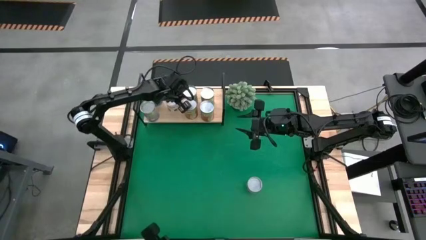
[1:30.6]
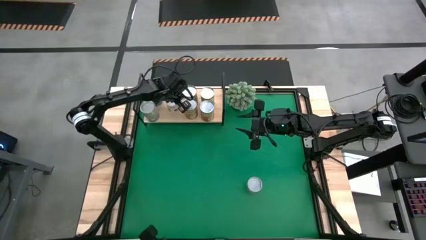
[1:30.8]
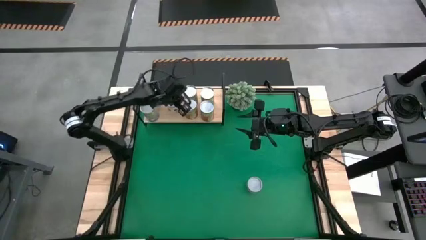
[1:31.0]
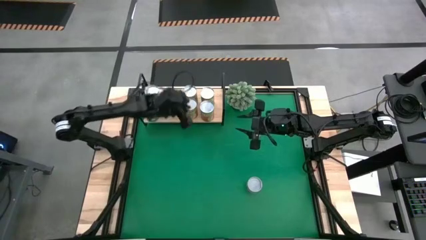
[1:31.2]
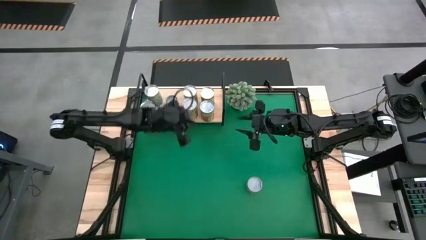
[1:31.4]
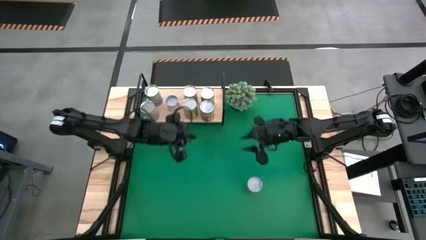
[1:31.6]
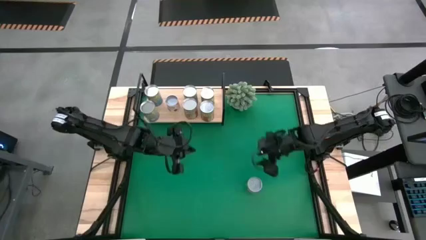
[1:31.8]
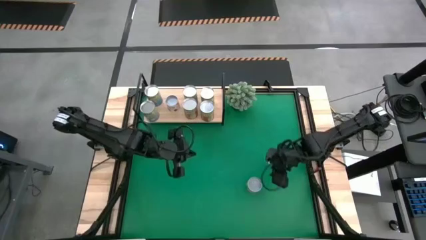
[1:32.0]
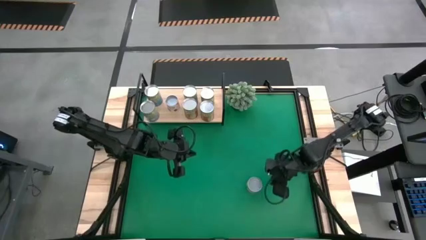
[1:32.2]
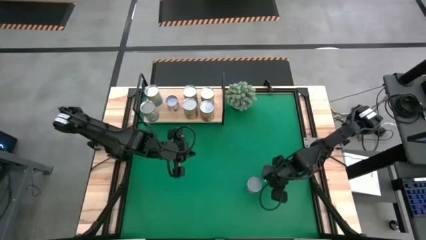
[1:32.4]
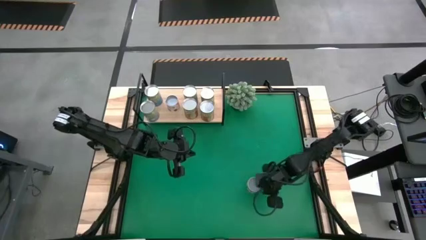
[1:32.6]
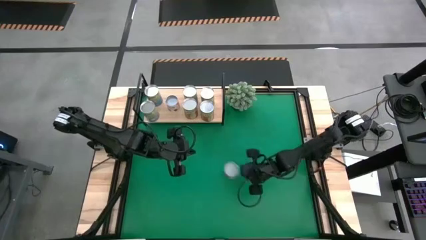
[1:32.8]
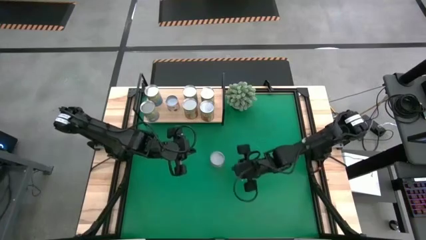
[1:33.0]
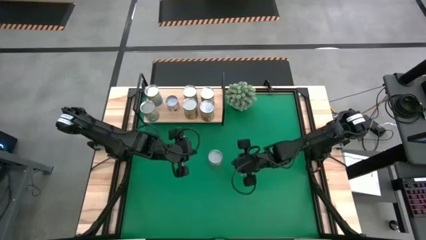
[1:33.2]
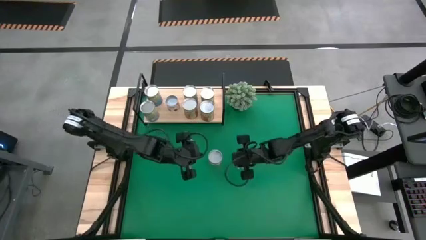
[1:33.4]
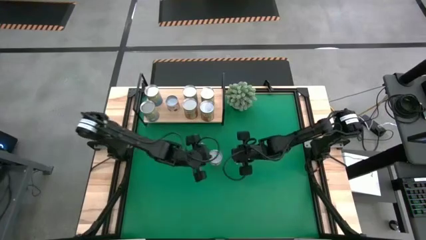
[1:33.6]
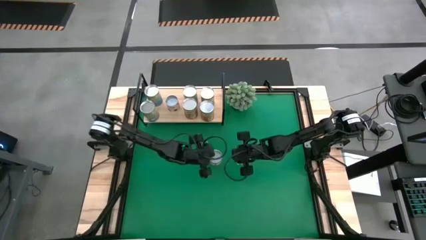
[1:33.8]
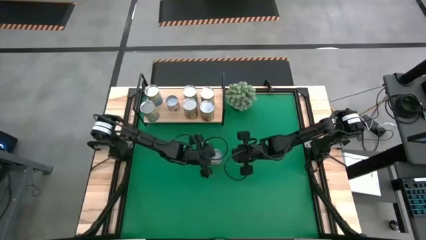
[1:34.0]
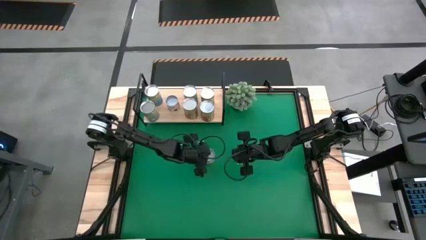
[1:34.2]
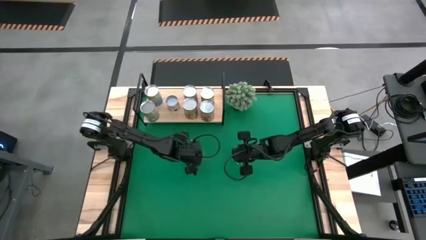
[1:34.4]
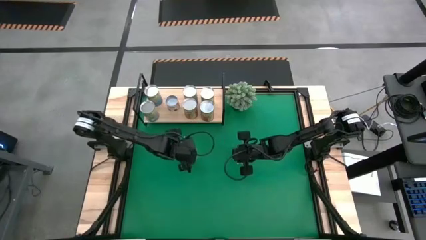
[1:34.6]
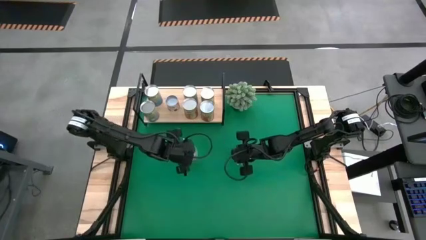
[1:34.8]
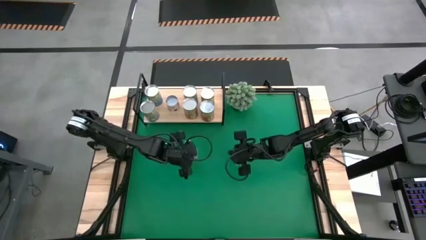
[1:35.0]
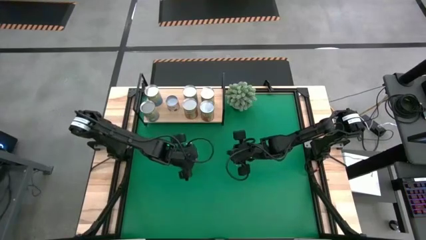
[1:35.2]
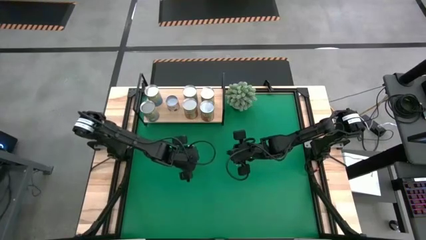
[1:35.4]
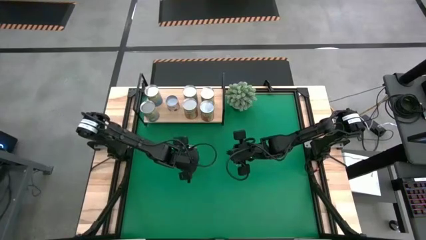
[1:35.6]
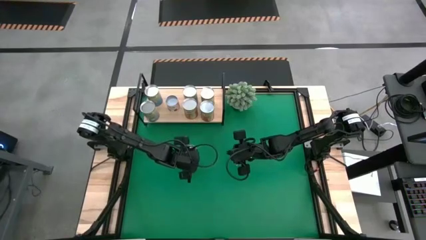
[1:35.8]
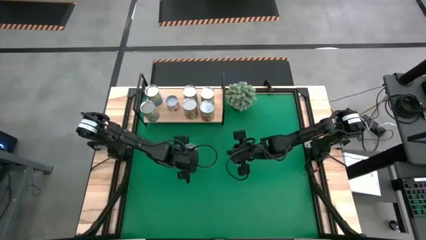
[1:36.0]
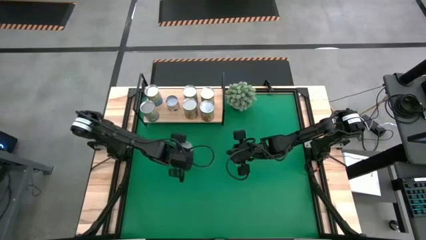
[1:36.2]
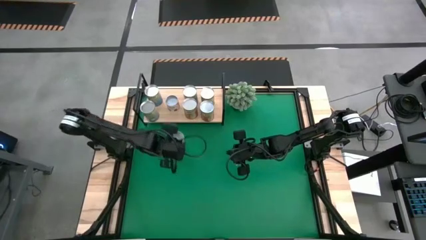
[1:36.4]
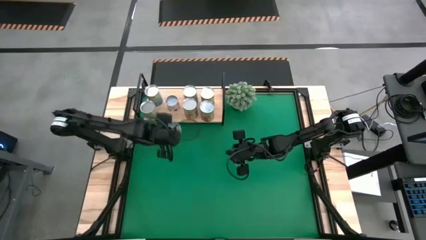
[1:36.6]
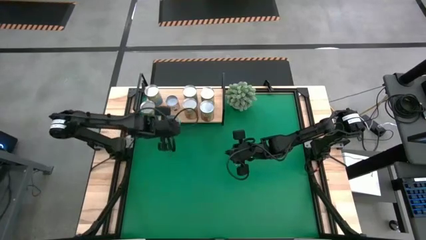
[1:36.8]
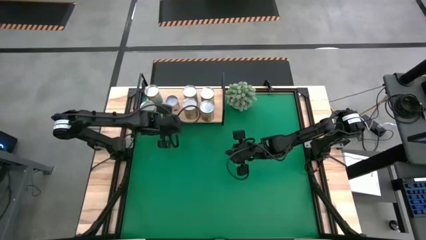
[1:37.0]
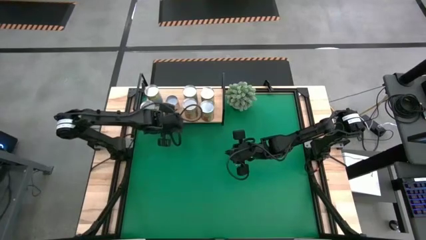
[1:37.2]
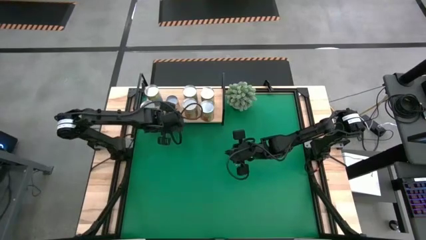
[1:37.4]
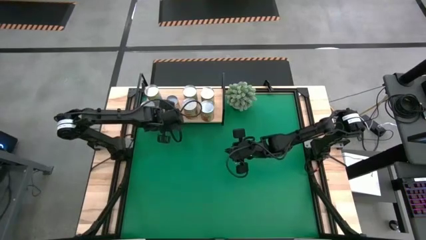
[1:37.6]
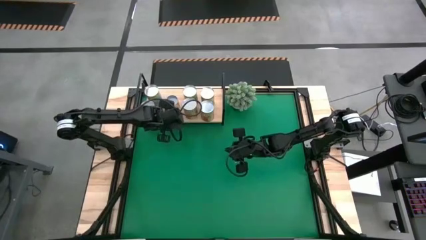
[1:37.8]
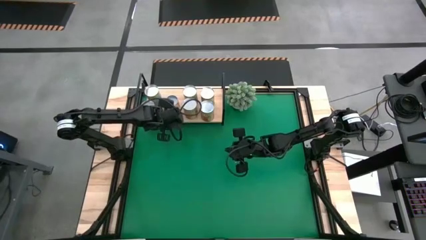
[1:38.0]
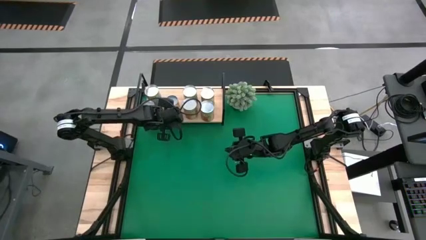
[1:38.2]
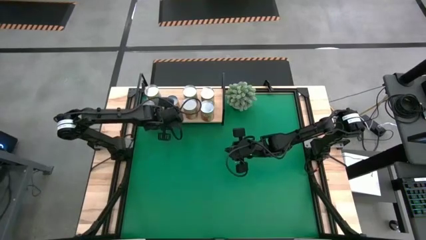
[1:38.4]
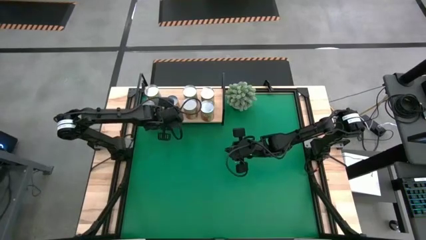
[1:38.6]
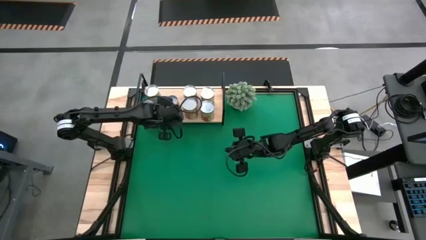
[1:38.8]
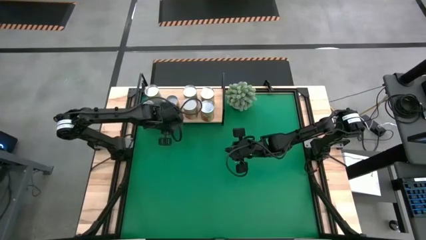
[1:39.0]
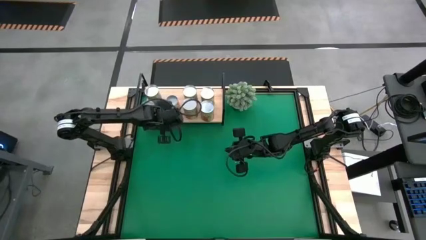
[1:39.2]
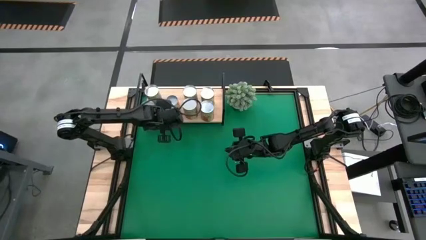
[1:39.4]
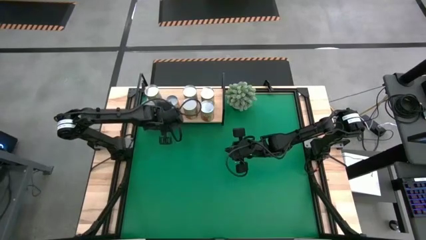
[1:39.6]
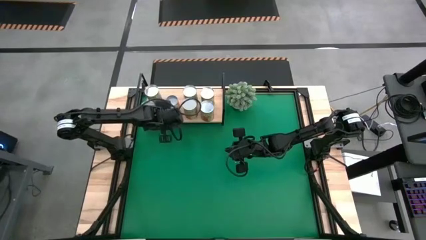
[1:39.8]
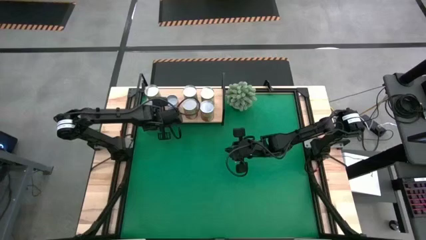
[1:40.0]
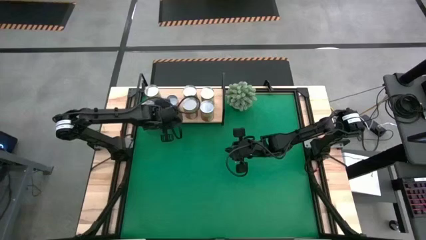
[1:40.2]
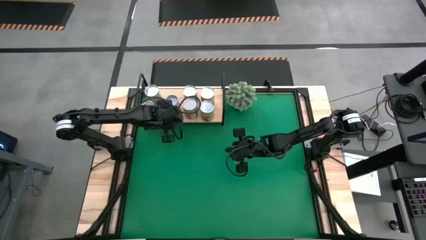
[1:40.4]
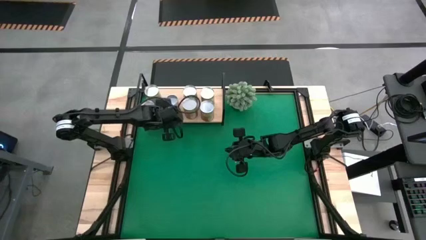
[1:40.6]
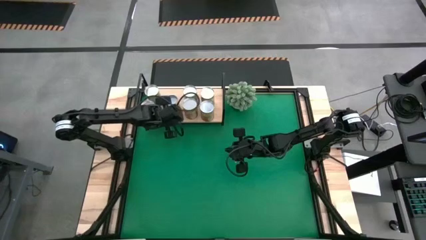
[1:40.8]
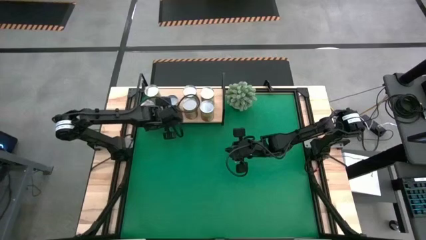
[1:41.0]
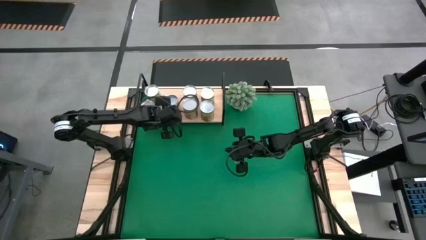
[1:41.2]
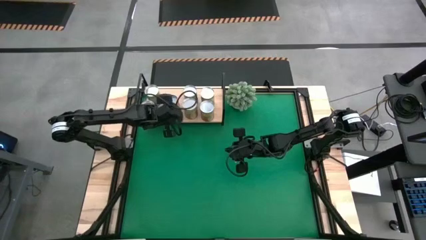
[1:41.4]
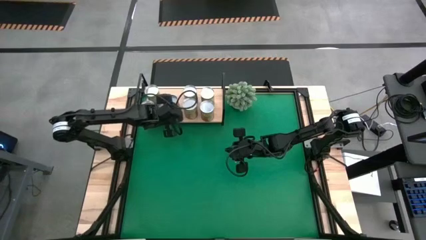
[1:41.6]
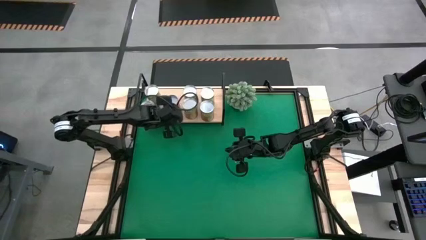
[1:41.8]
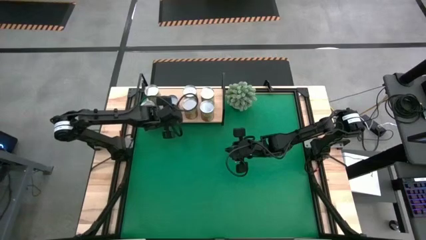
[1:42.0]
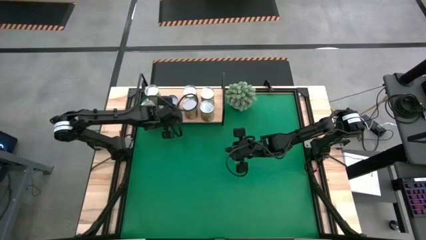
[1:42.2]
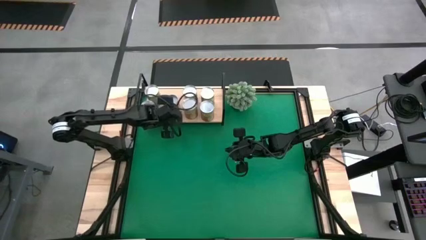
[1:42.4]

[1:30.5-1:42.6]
Task: Pick and place cans onto a shelf
Put the canned sliced peaches on the shelf

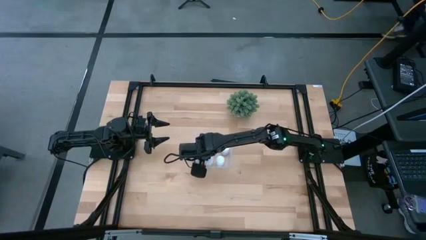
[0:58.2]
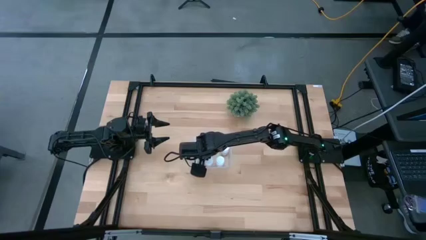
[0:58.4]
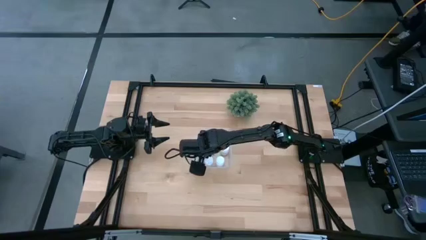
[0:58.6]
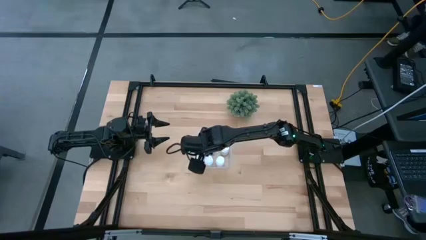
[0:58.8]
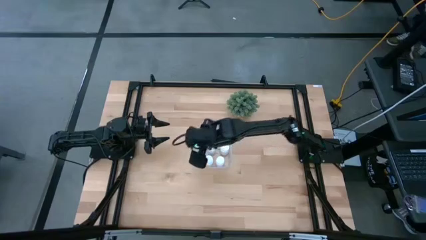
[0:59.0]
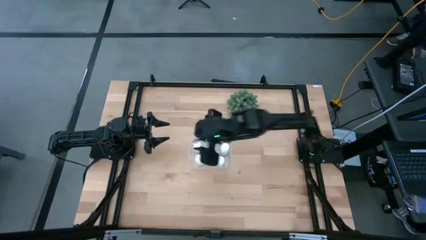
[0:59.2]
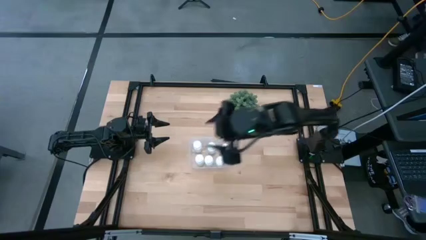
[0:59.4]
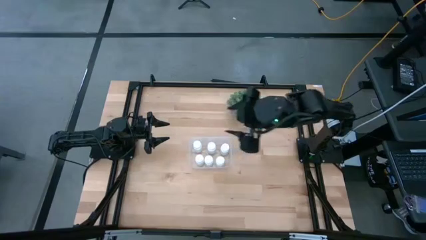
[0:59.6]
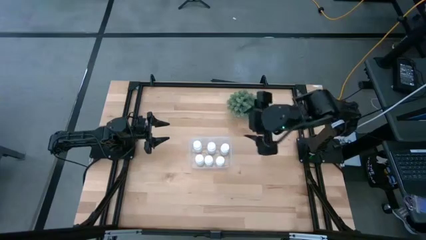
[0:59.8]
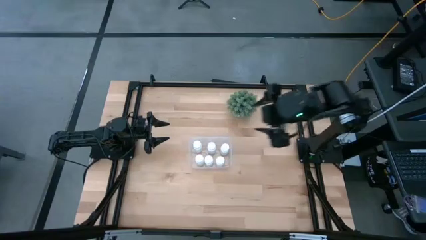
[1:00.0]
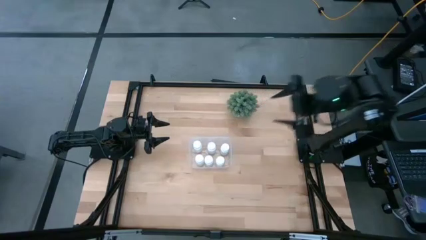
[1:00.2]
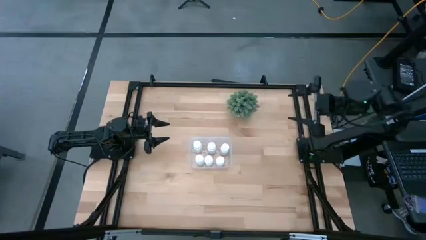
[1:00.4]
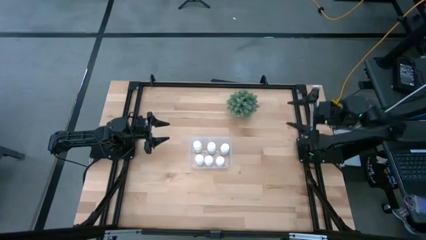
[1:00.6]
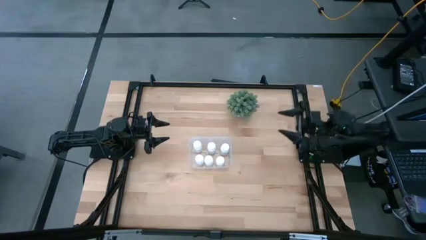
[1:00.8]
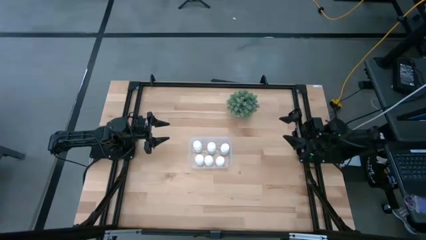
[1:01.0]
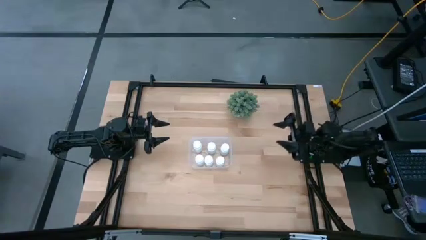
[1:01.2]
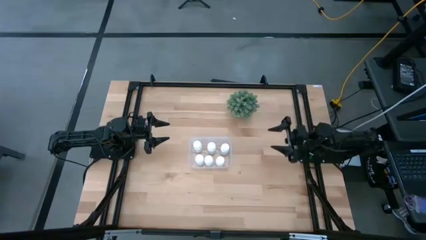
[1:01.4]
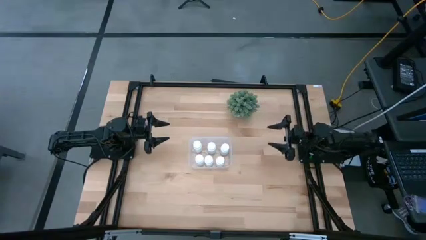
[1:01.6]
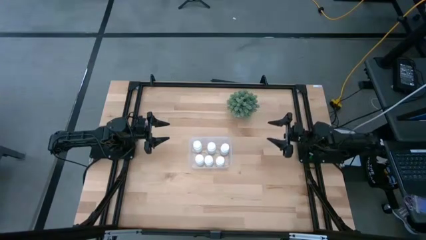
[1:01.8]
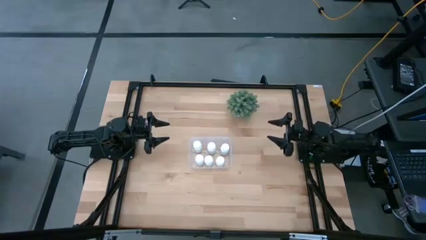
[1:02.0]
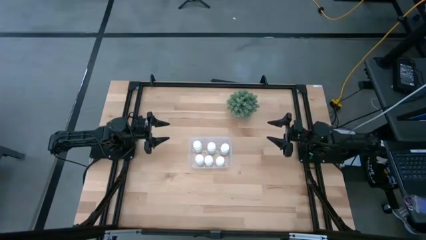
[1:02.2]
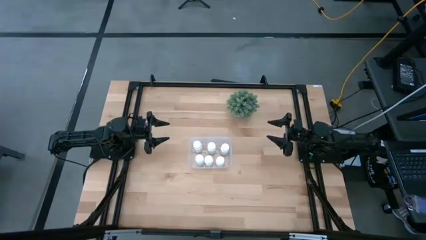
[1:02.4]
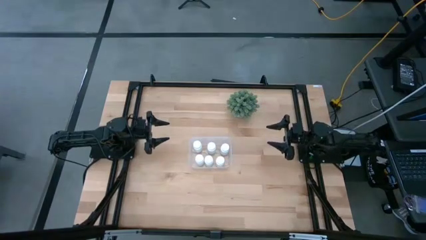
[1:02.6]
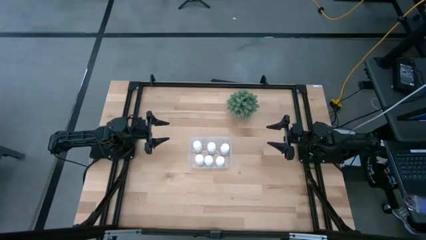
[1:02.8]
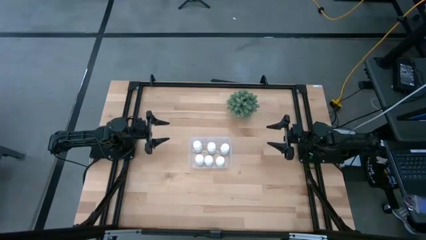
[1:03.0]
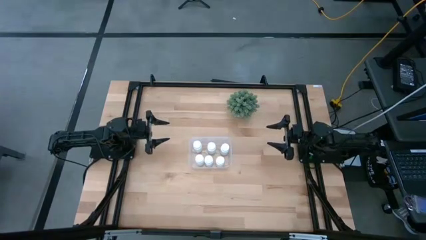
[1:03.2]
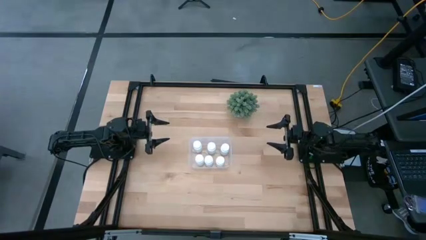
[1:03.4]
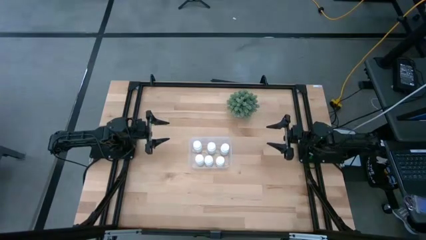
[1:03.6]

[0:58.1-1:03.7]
Task: Pick and place pill bottles into a basket
Return to Home Position
